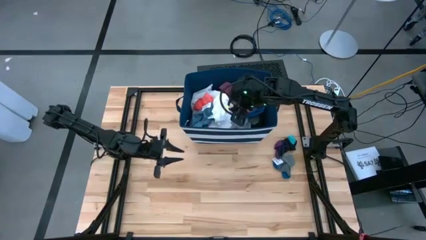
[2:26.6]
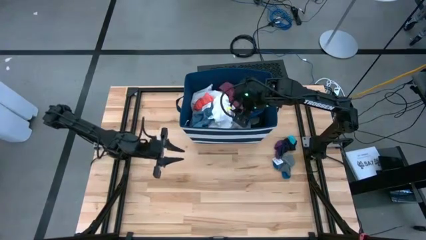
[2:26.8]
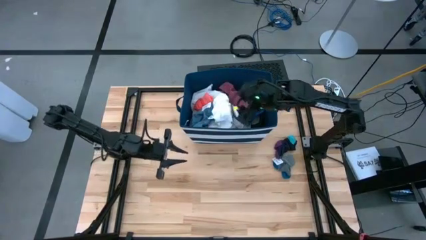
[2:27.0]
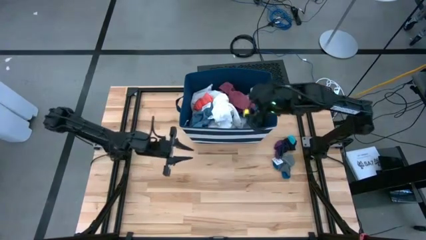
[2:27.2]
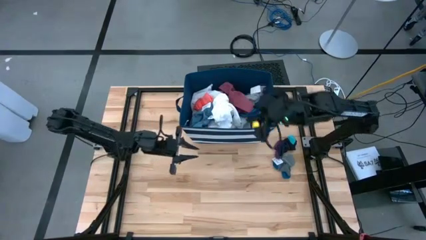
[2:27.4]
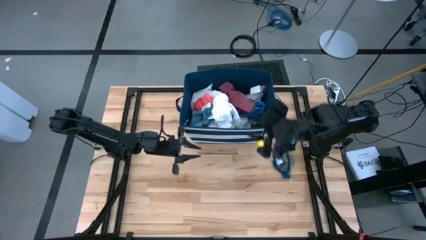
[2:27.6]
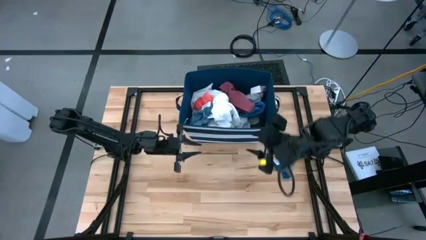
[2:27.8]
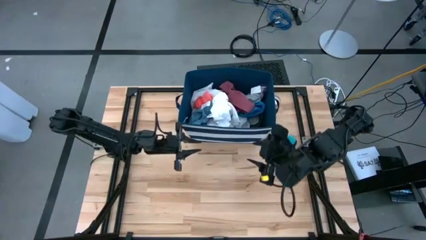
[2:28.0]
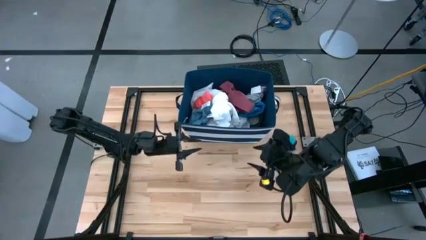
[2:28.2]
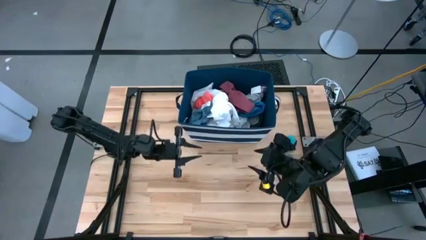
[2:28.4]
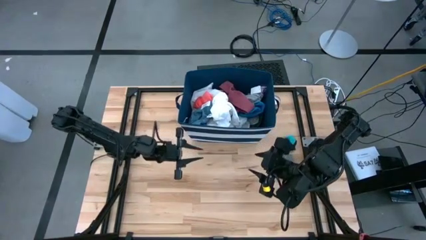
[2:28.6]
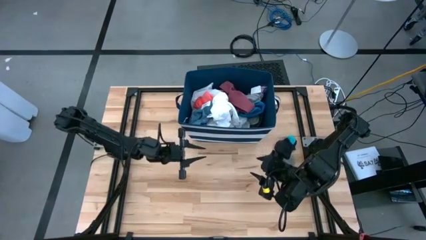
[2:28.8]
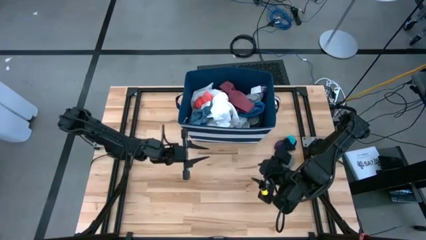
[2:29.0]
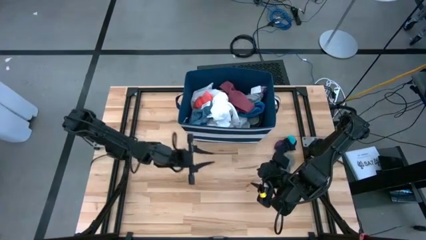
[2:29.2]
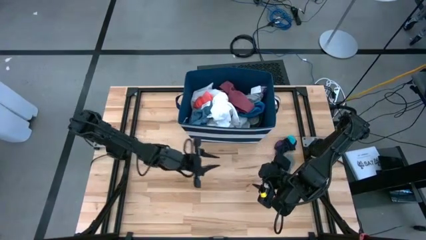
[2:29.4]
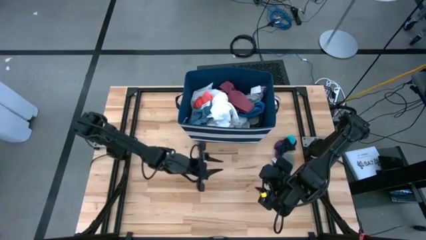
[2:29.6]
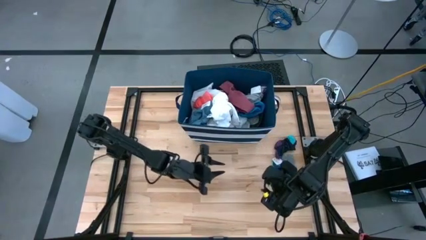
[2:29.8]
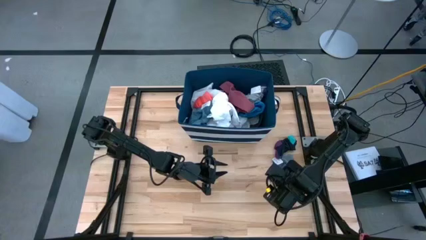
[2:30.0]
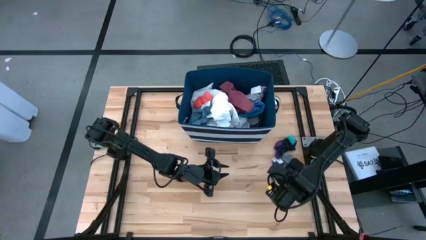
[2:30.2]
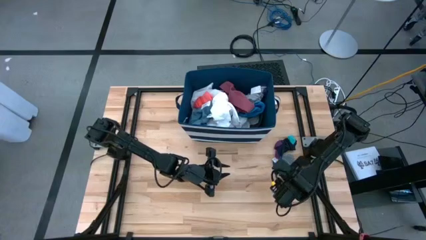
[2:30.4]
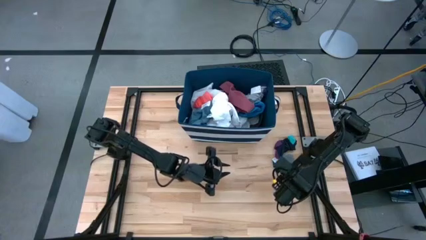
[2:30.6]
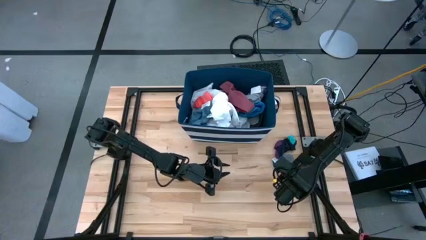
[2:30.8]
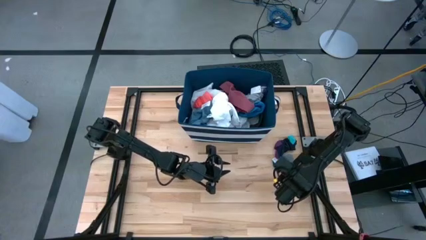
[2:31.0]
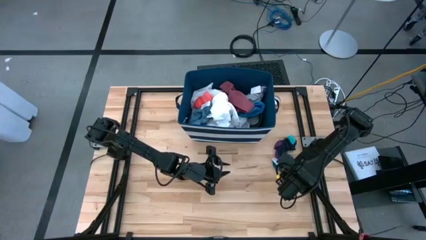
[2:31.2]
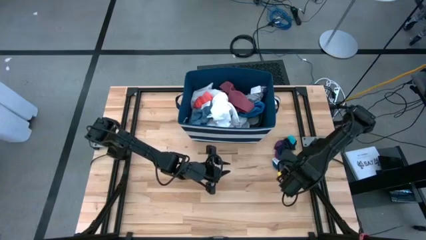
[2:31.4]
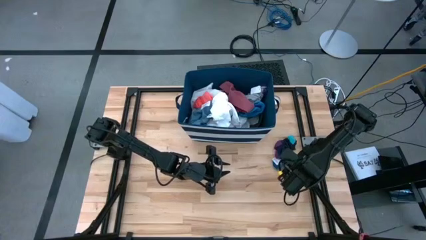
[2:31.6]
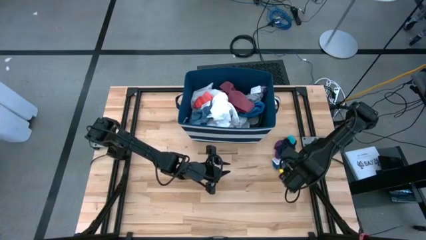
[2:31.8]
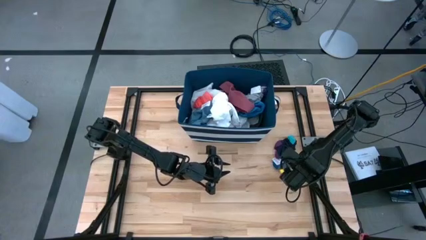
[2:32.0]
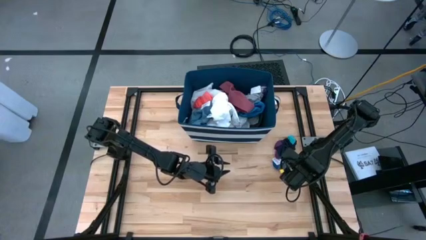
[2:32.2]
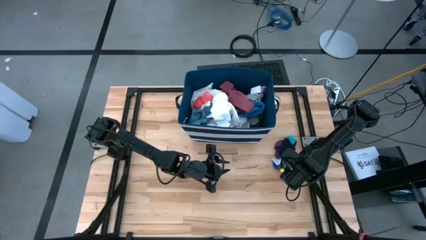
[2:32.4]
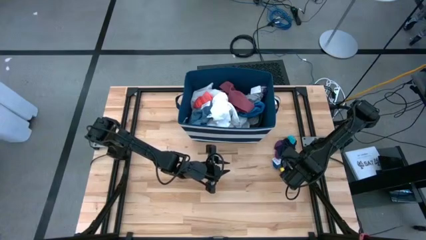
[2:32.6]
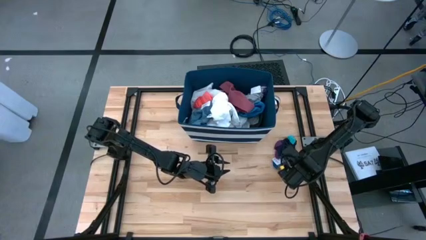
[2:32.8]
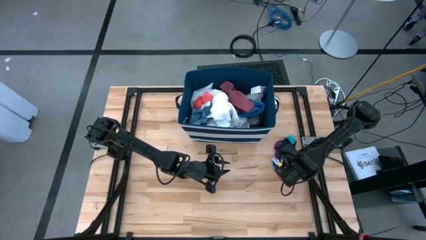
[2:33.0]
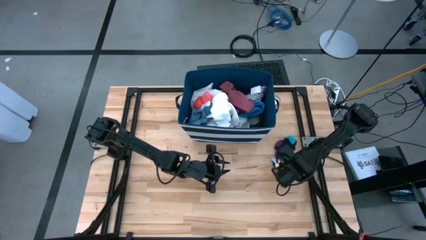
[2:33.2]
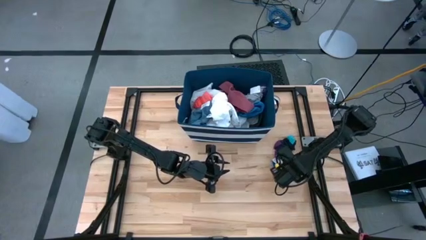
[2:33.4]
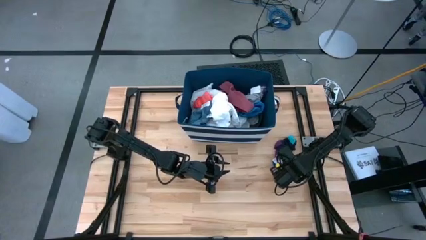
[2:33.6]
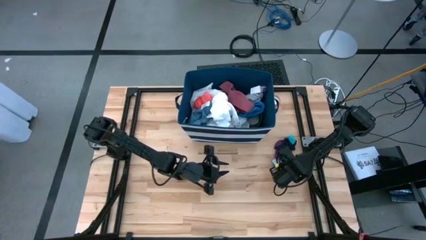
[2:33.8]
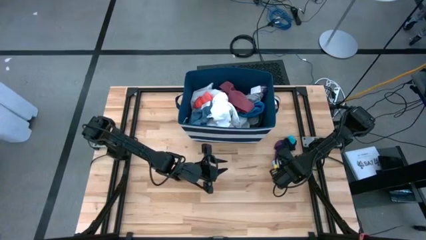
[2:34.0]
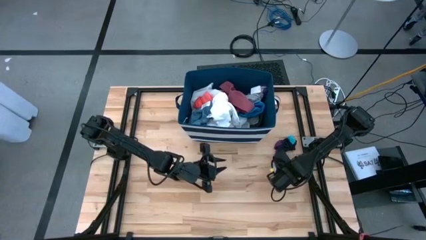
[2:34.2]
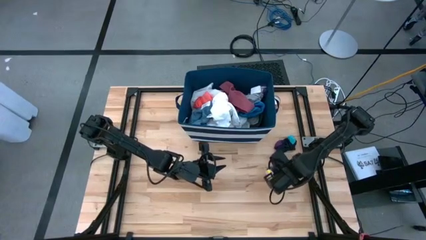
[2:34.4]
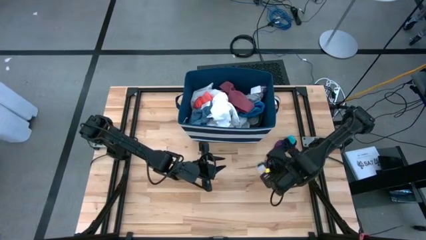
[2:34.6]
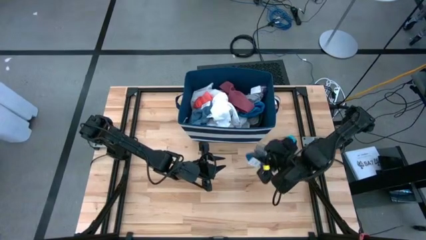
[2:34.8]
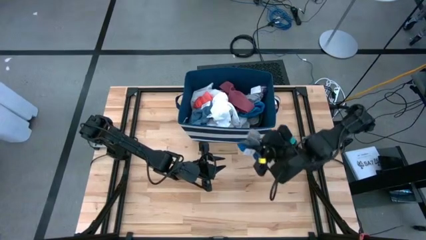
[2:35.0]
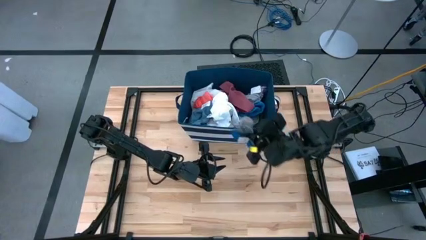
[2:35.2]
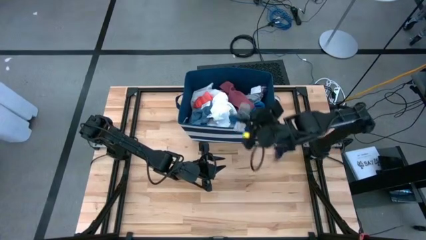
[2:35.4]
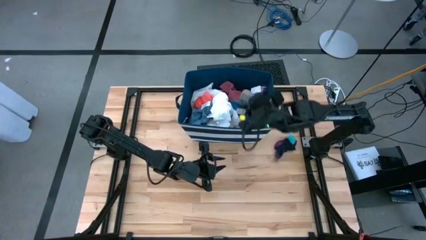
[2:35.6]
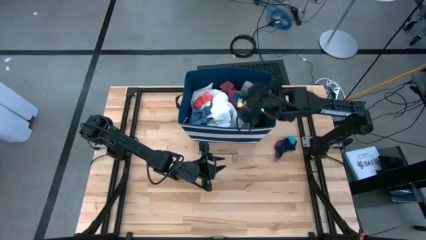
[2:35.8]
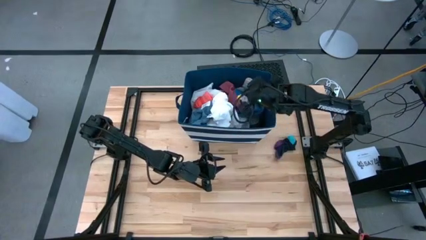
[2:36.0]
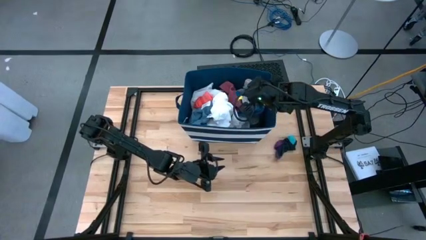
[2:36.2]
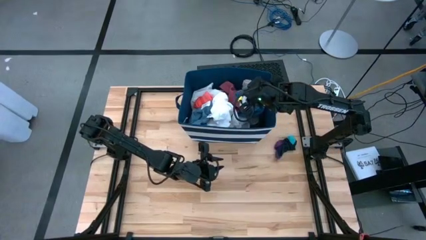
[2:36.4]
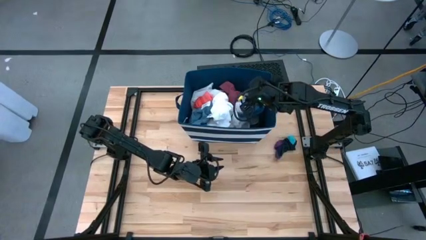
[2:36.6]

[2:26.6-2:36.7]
Task: Sort clothes
Put the gray and blue socks into the blue laundry organizer

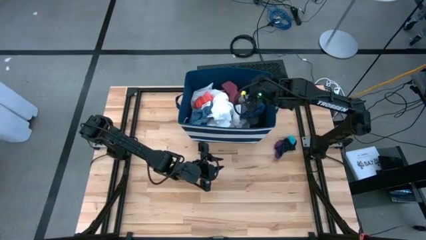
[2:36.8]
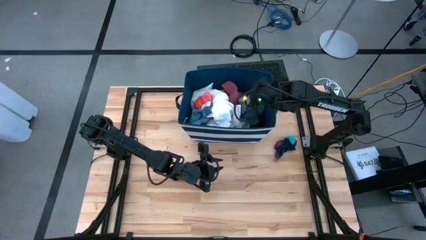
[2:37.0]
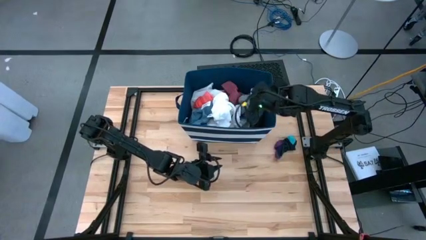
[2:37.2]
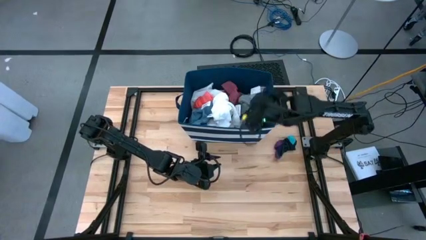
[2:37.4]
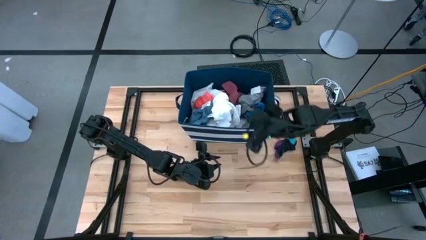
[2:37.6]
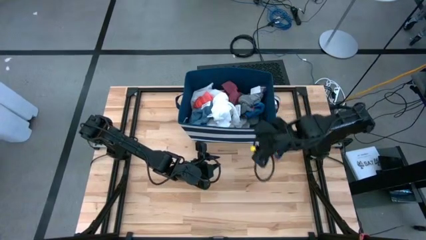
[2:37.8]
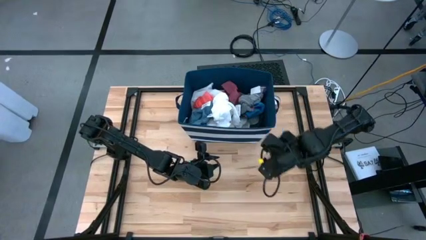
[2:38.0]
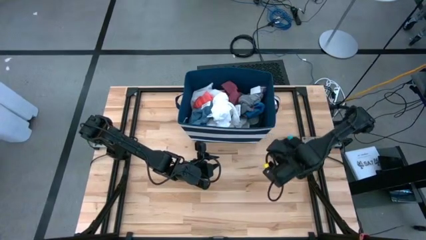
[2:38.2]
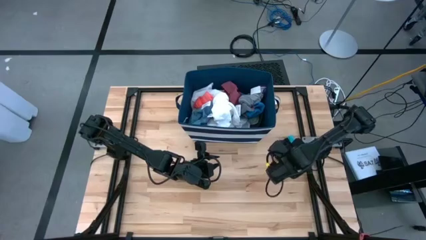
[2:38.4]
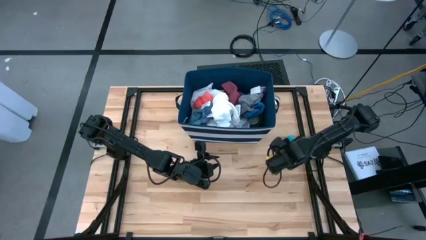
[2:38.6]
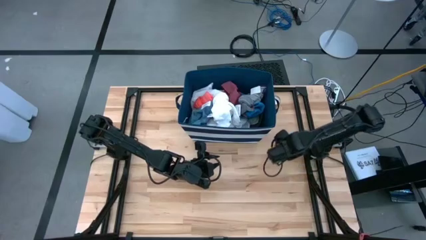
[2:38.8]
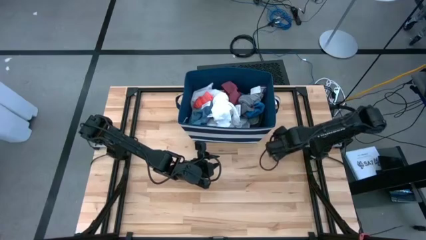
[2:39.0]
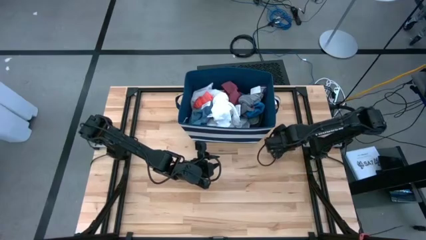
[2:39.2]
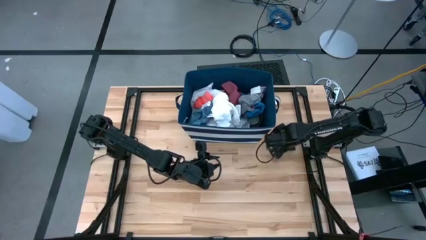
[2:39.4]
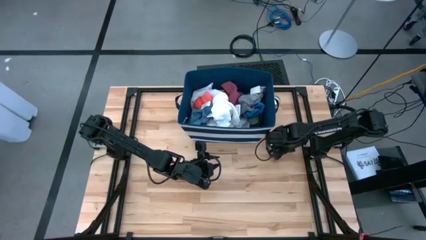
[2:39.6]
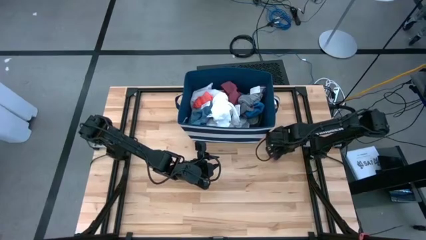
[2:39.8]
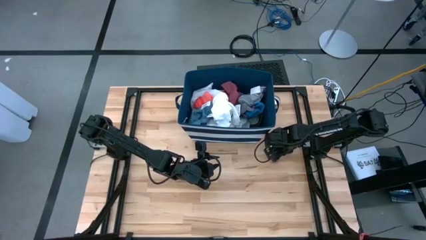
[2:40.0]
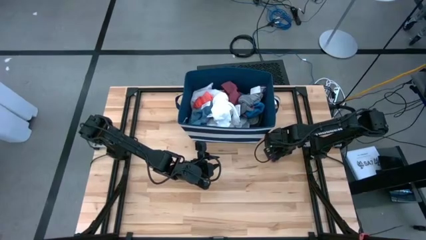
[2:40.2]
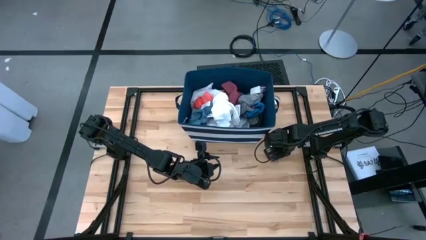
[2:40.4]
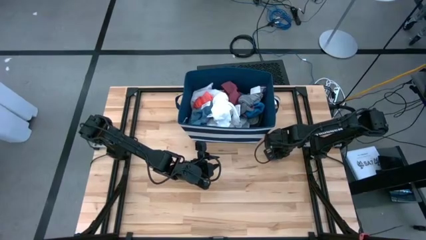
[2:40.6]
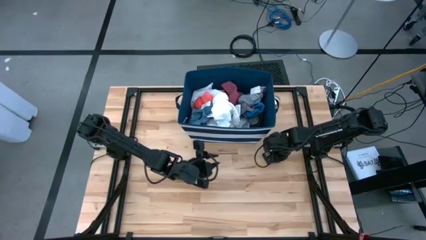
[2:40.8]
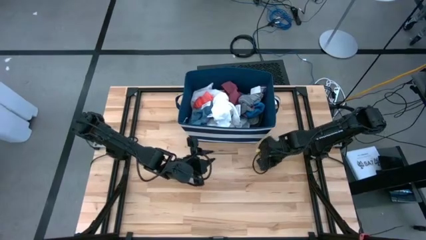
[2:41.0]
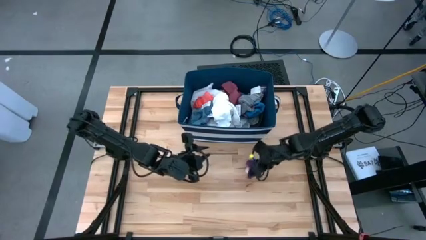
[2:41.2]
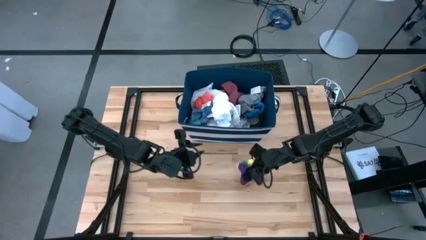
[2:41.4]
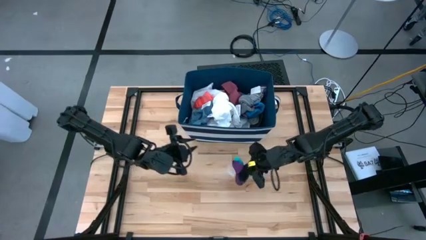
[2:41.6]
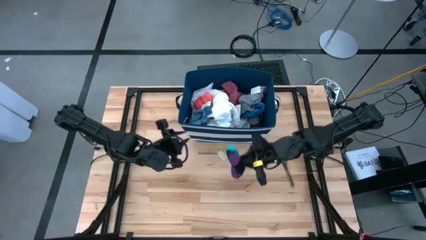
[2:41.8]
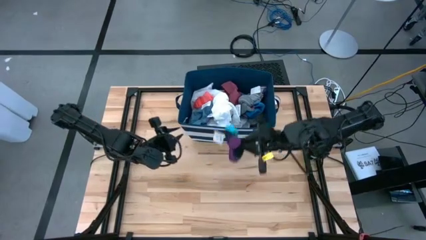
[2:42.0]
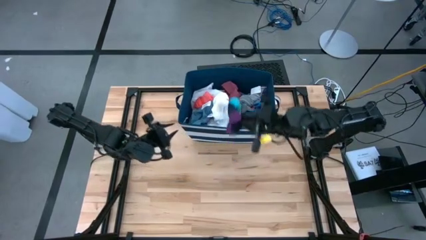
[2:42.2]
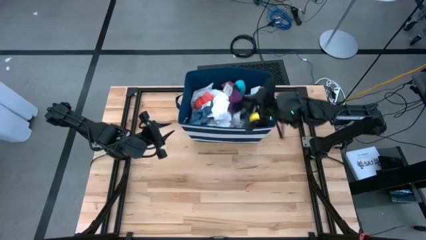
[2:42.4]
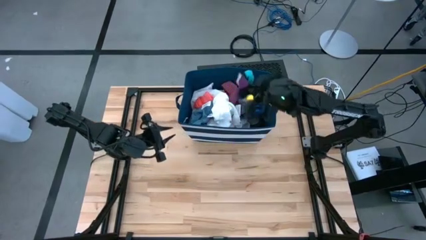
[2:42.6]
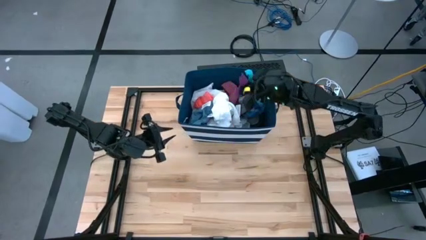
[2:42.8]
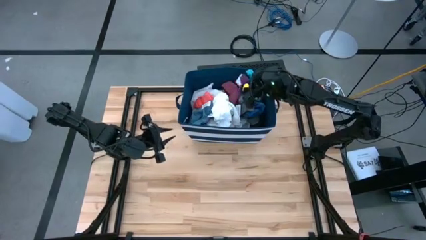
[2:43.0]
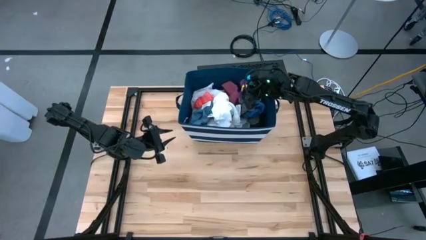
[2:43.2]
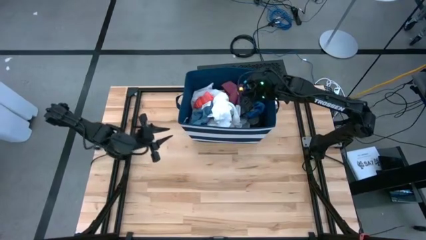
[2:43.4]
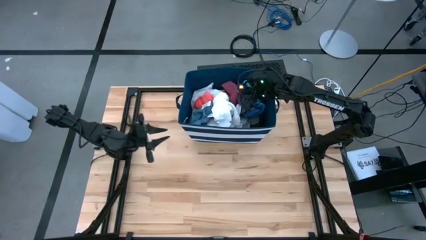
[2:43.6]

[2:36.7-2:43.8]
Put the black socks into the blue laundry organizer
